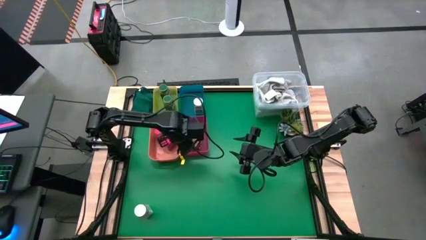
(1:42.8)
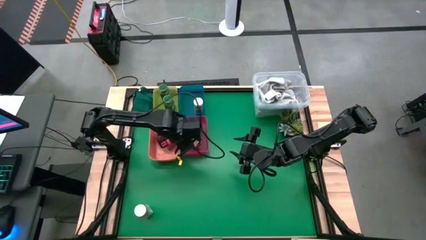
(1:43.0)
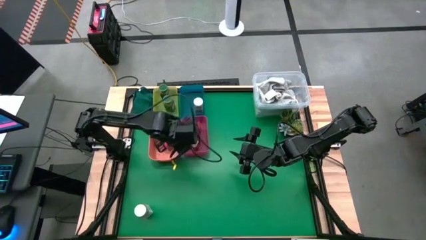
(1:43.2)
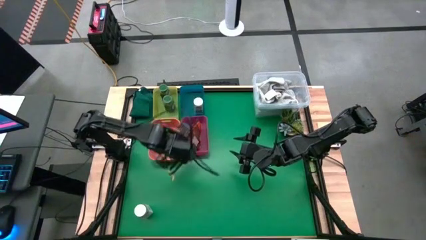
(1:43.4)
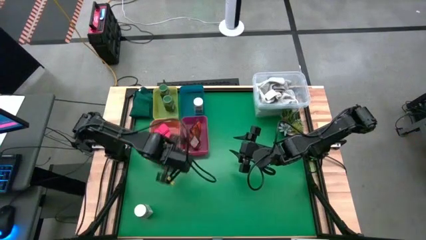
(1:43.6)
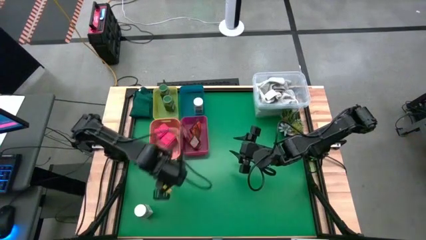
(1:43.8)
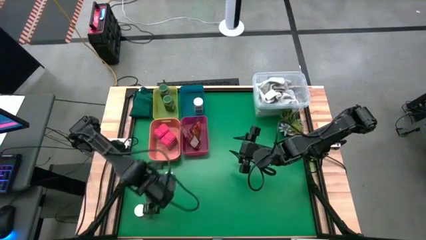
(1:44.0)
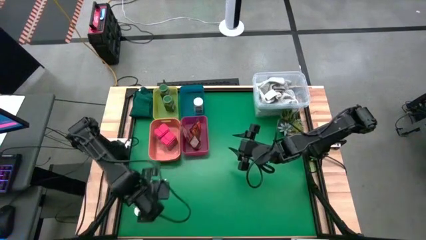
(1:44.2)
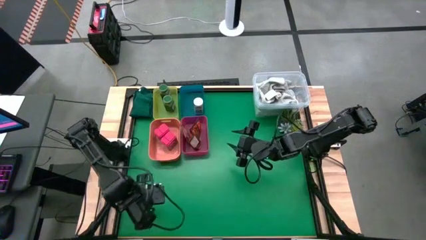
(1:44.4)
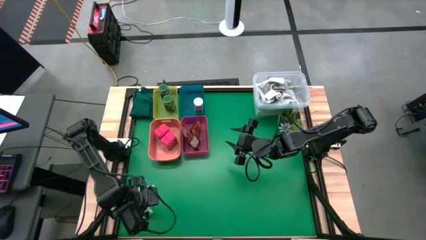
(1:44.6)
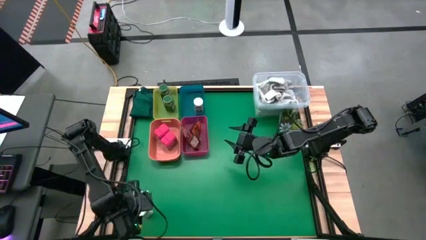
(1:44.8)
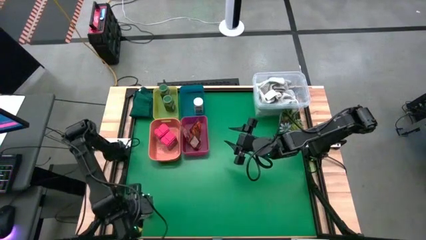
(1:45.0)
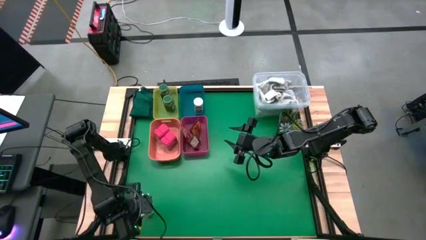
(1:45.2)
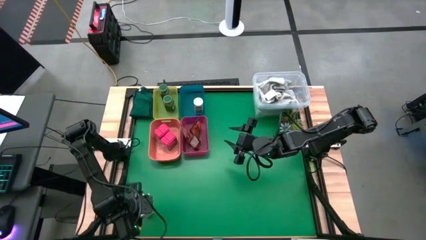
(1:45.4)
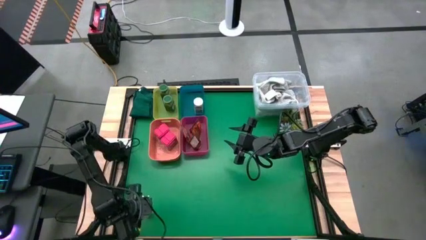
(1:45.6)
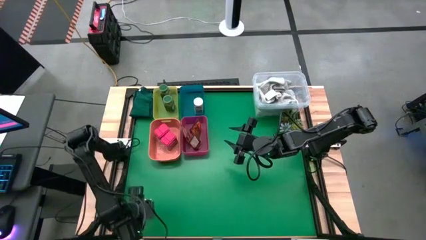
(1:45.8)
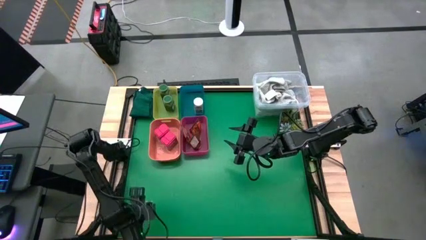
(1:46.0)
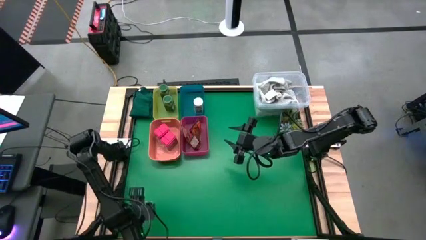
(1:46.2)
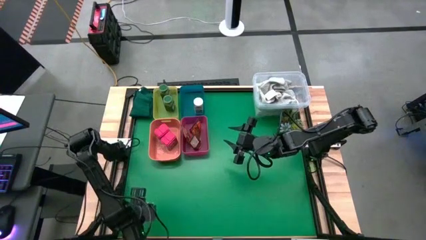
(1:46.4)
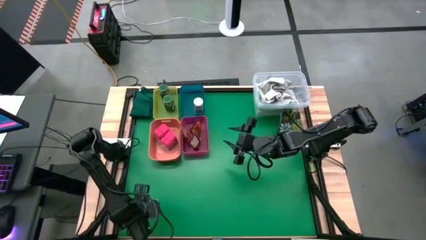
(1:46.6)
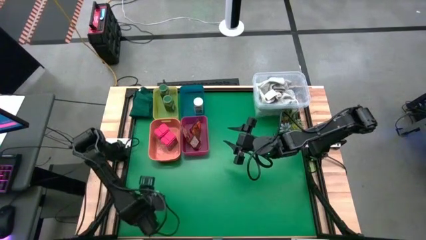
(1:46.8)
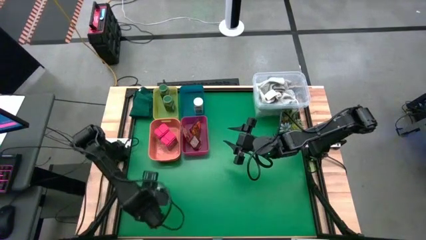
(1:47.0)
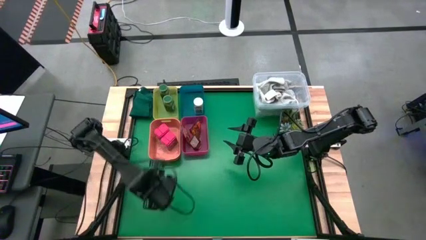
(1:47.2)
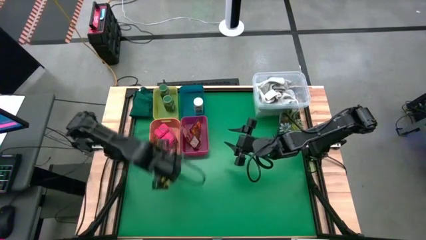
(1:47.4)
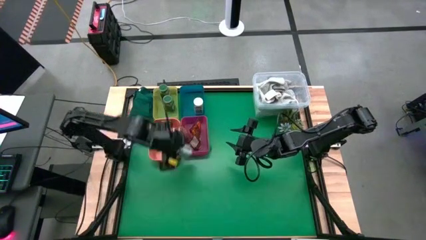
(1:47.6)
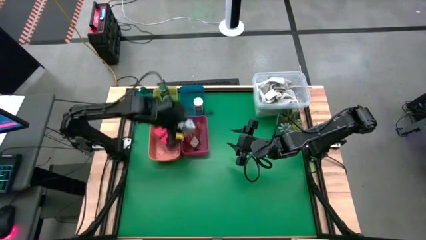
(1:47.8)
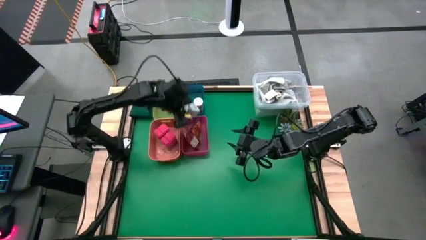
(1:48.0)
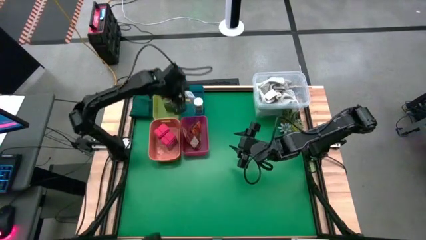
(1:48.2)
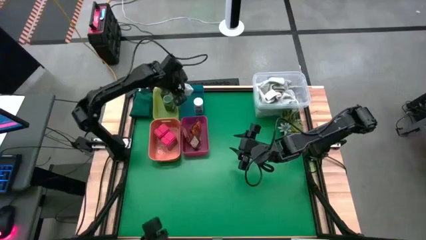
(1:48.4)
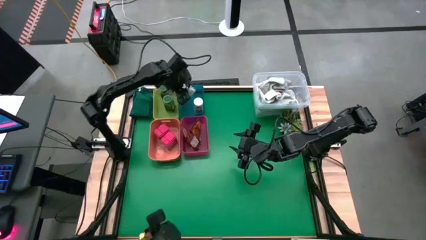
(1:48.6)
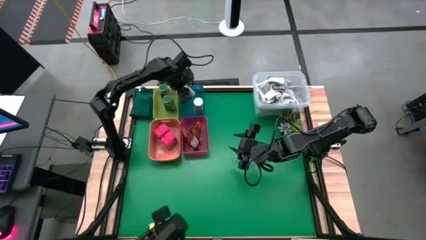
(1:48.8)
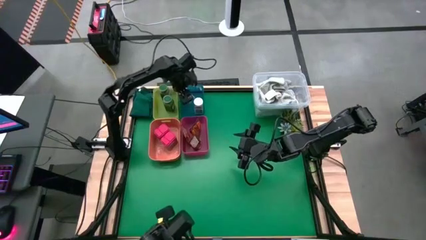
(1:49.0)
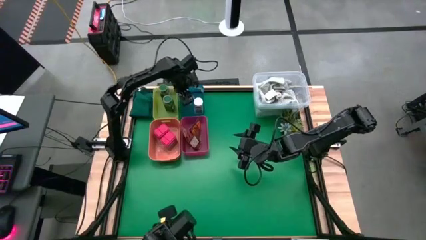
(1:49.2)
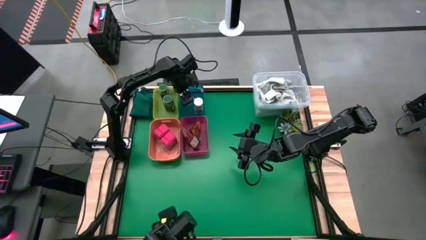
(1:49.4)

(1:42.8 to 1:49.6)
Task: Sort spices by type
Put the white seasoning bottle into the blue bin

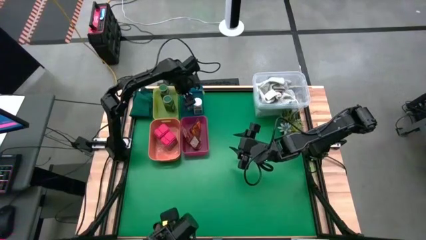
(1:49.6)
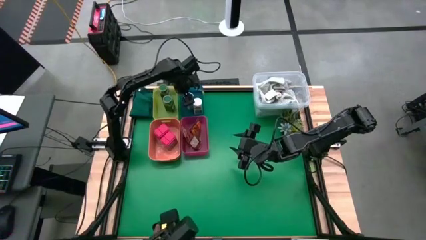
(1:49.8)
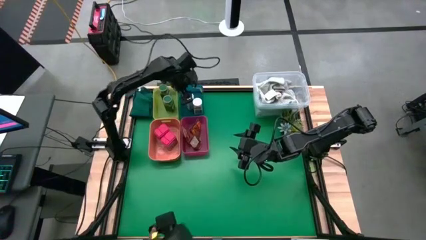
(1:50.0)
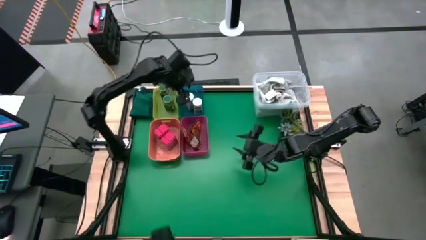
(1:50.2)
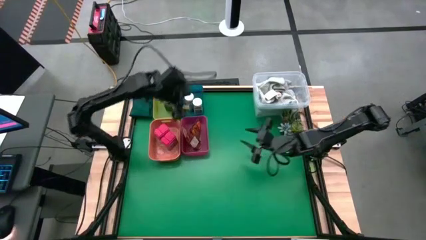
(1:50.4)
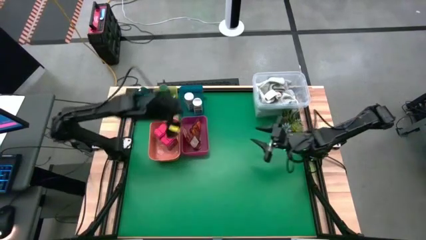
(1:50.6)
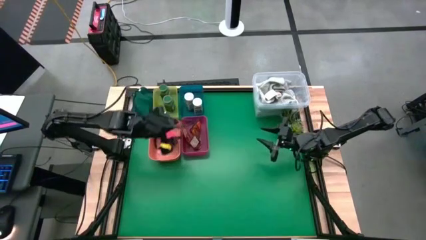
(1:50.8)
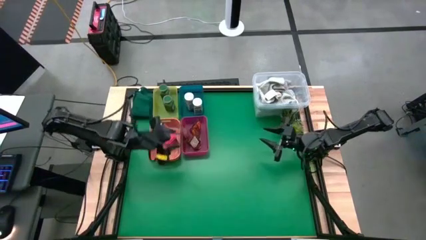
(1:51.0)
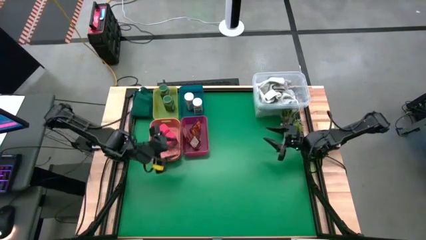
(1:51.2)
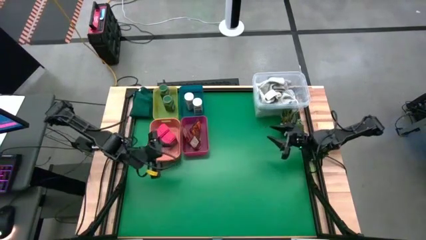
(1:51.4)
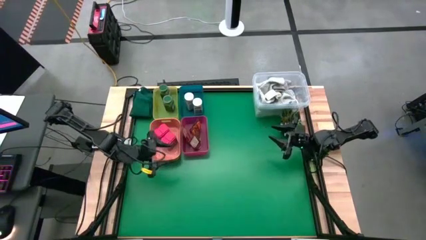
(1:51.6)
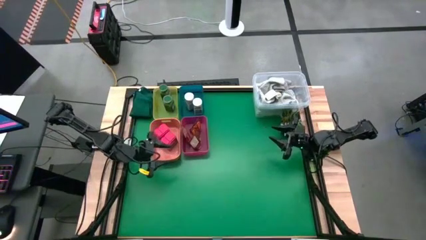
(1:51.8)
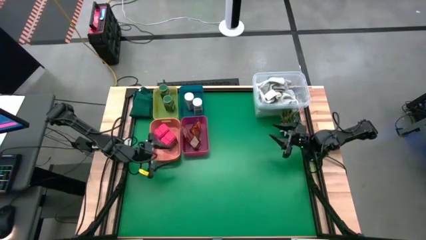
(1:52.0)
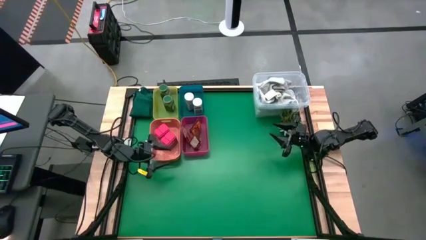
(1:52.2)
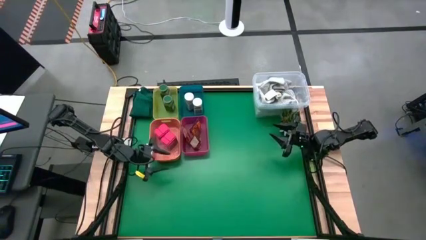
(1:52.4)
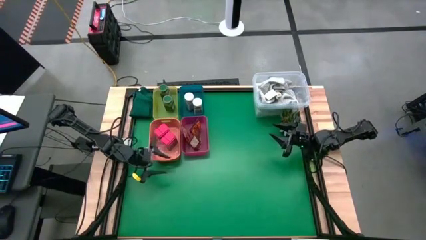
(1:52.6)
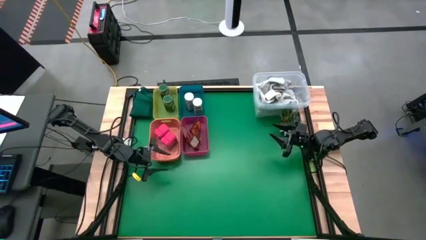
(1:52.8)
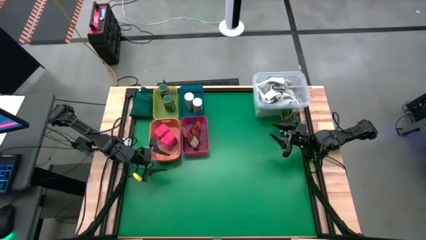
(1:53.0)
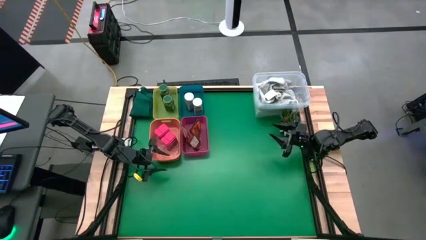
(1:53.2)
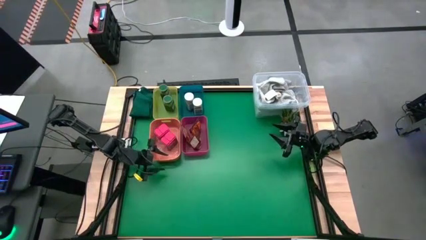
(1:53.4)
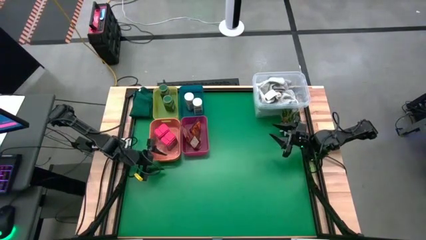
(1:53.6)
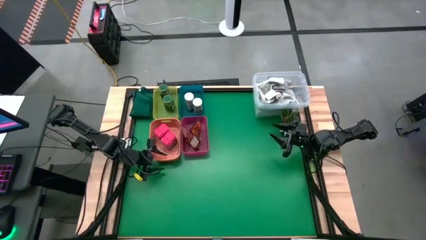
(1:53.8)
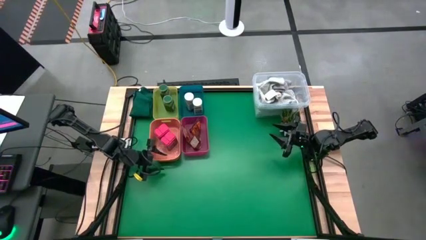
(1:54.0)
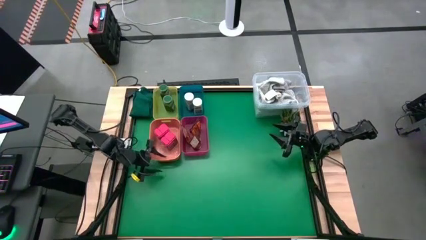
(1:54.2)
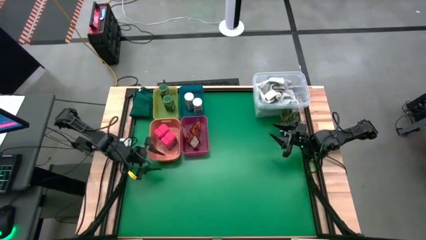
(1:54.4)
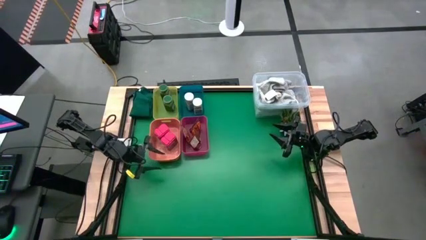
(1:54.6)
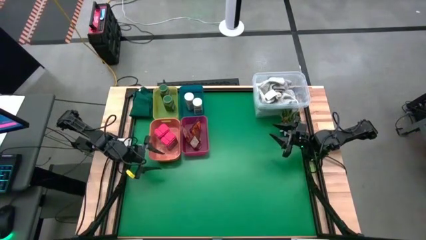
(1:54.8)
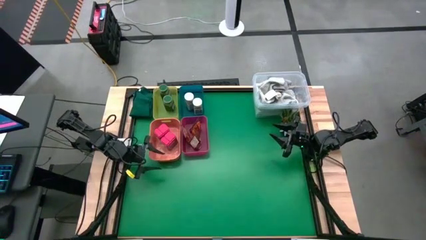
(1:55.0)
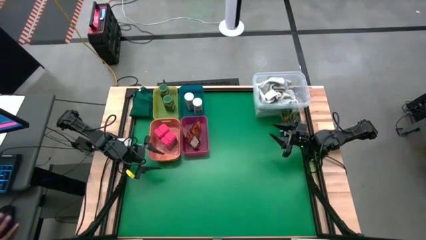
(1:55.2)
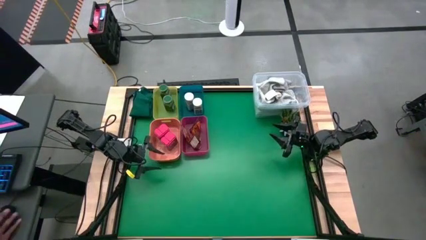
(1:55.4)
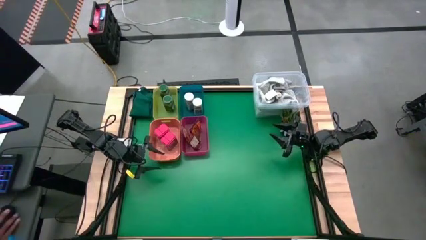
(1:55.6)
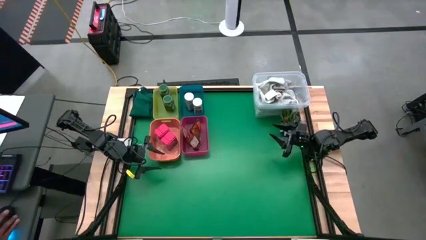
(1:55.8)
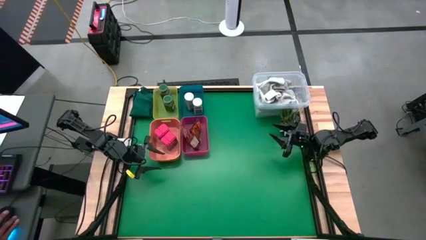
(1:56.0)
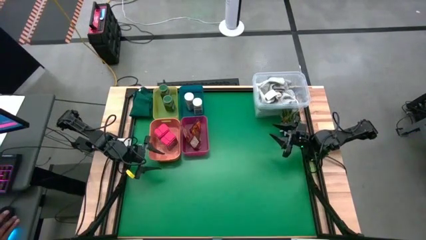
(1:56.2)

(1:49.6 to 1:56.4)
Return to Home Position
